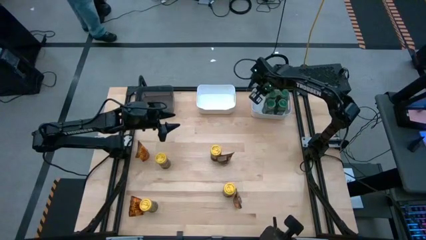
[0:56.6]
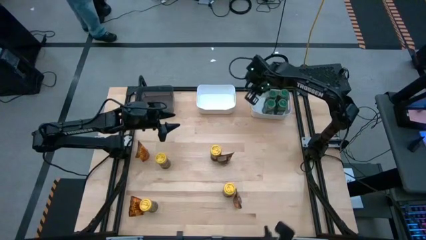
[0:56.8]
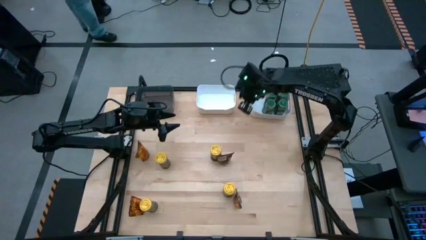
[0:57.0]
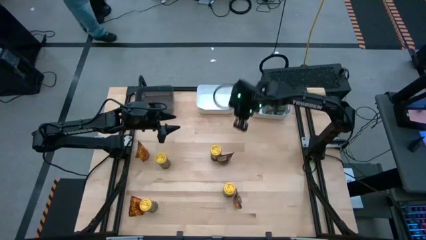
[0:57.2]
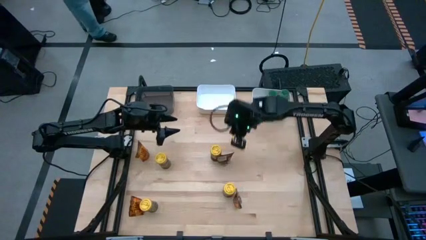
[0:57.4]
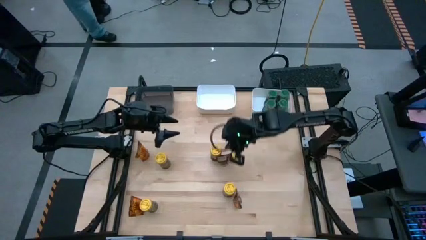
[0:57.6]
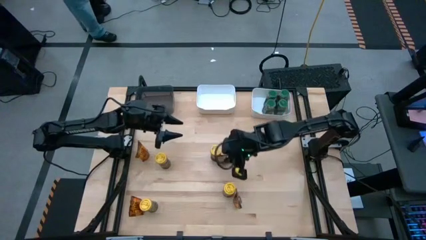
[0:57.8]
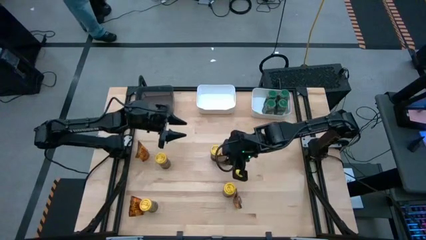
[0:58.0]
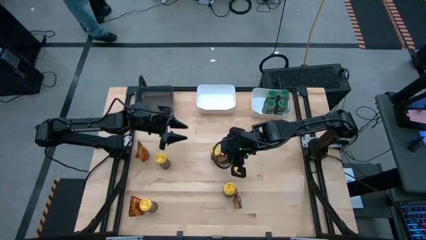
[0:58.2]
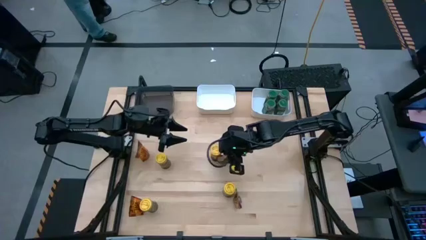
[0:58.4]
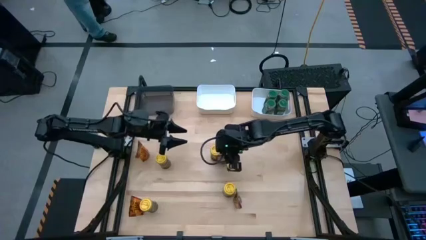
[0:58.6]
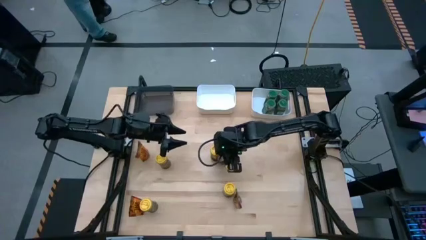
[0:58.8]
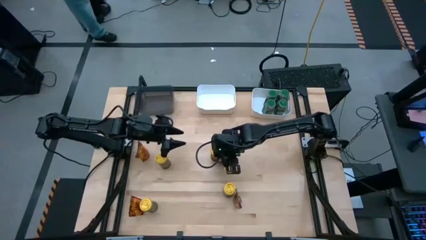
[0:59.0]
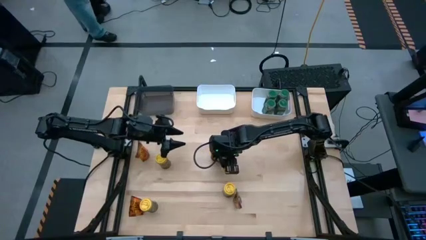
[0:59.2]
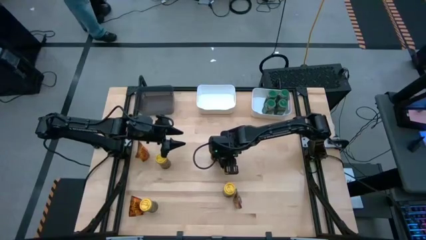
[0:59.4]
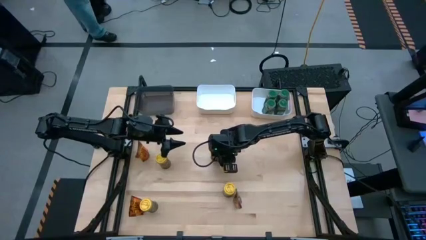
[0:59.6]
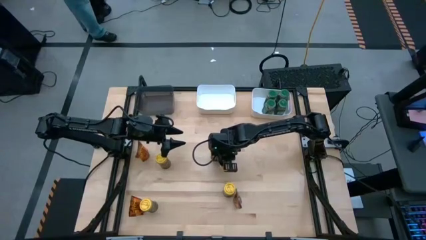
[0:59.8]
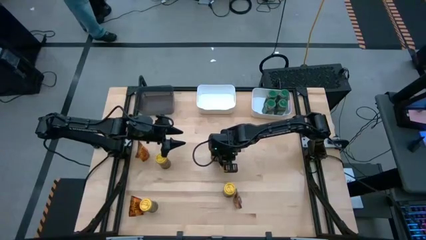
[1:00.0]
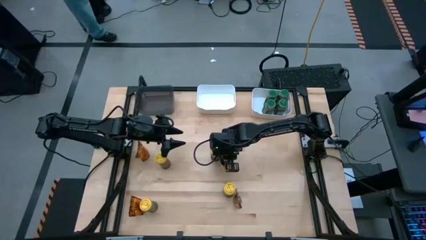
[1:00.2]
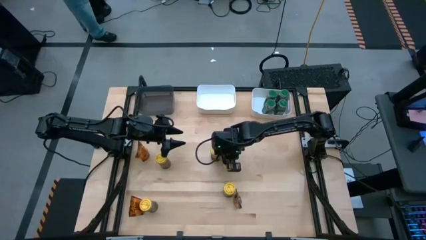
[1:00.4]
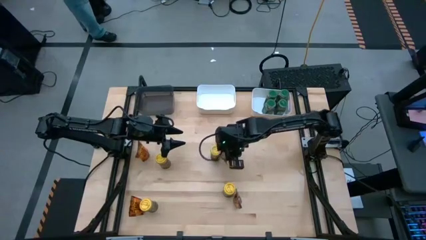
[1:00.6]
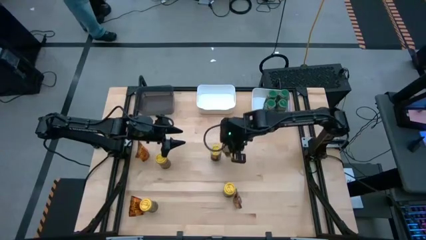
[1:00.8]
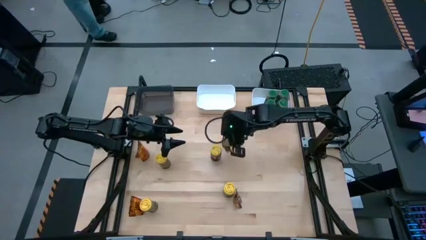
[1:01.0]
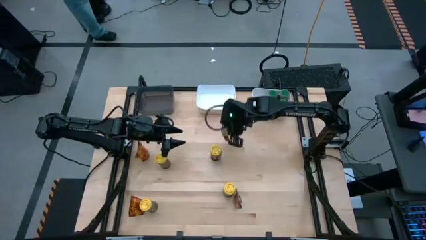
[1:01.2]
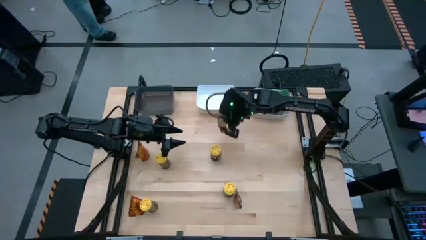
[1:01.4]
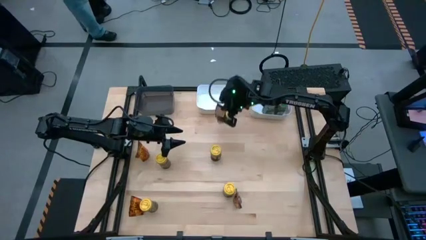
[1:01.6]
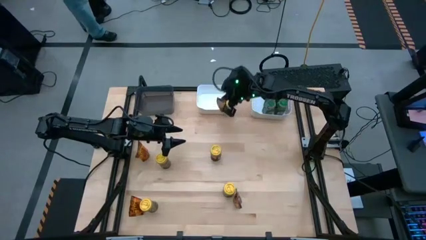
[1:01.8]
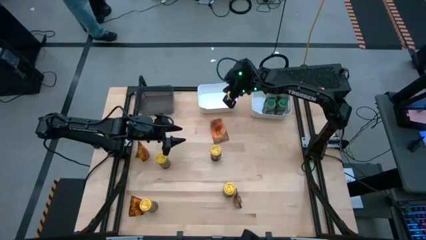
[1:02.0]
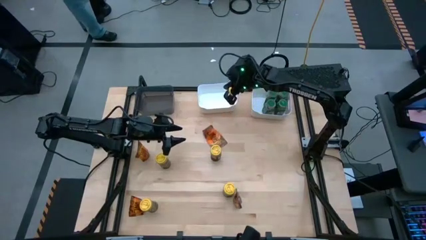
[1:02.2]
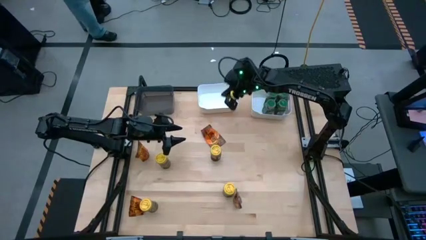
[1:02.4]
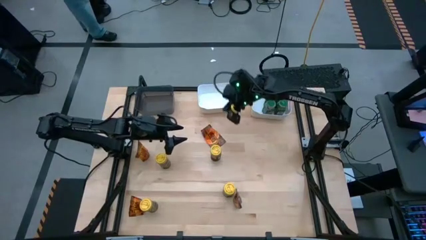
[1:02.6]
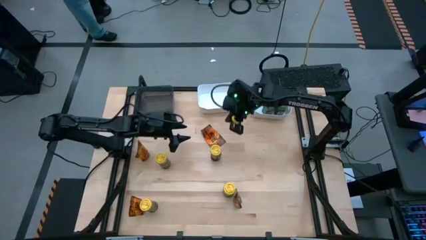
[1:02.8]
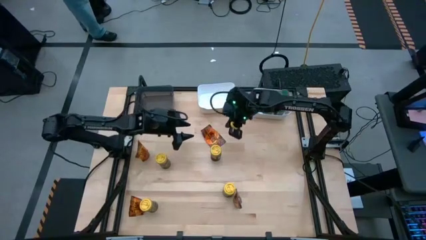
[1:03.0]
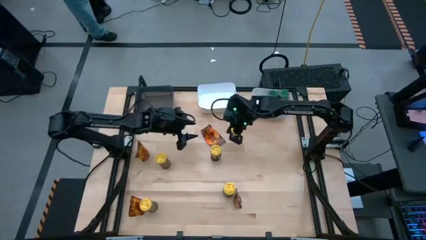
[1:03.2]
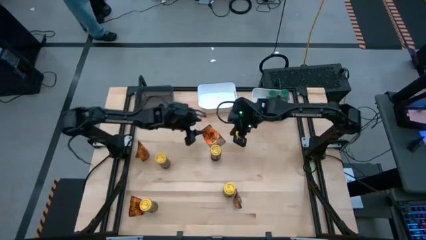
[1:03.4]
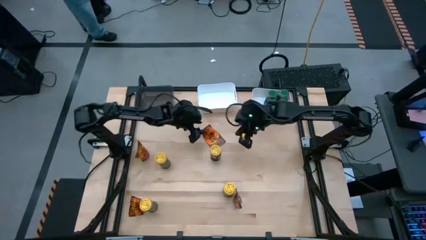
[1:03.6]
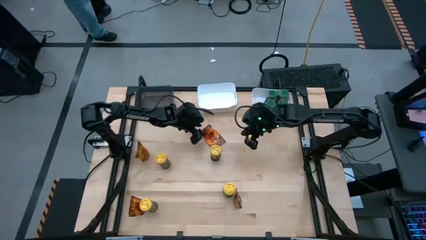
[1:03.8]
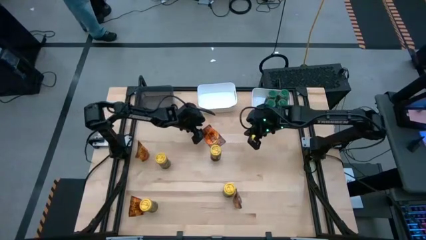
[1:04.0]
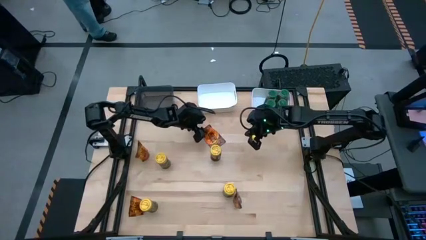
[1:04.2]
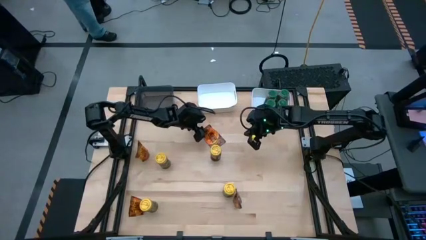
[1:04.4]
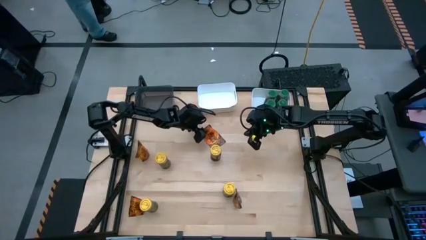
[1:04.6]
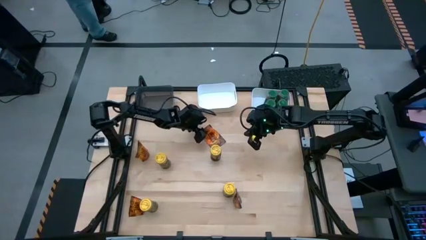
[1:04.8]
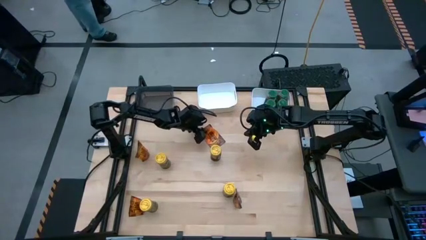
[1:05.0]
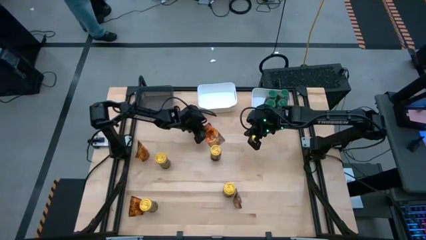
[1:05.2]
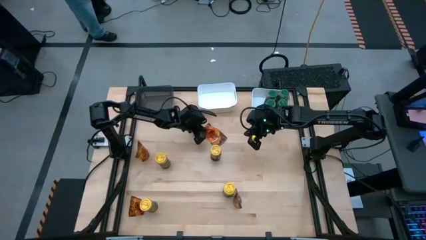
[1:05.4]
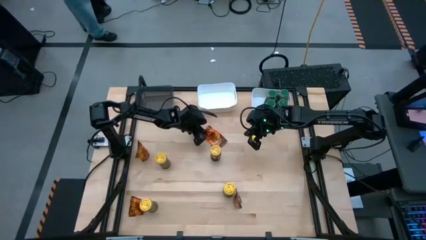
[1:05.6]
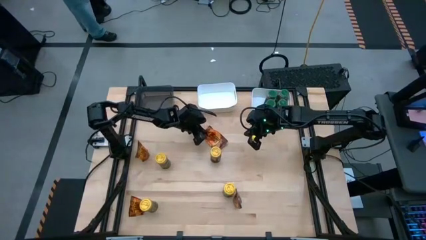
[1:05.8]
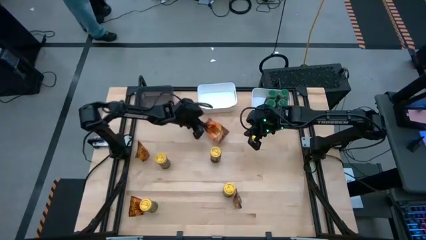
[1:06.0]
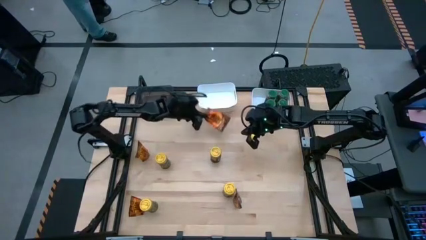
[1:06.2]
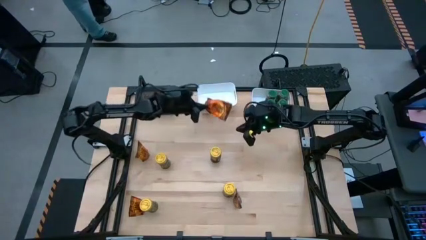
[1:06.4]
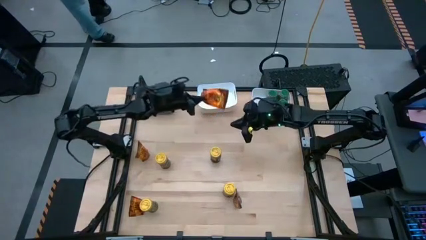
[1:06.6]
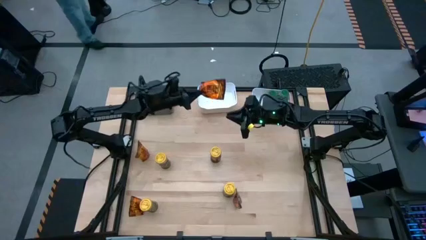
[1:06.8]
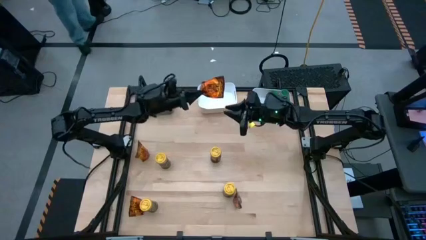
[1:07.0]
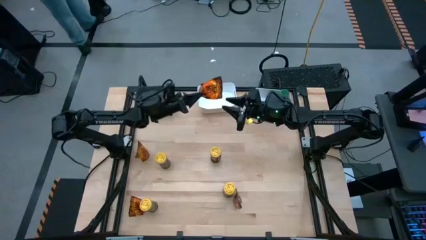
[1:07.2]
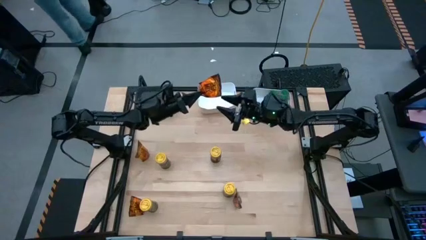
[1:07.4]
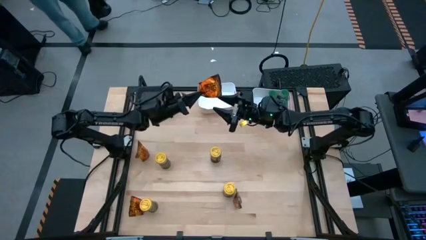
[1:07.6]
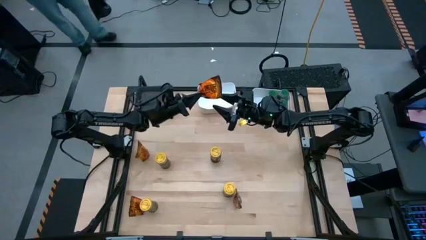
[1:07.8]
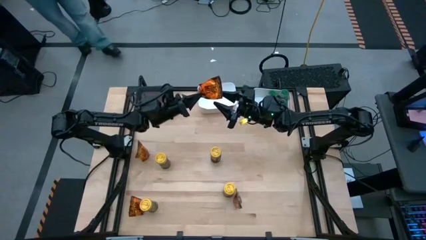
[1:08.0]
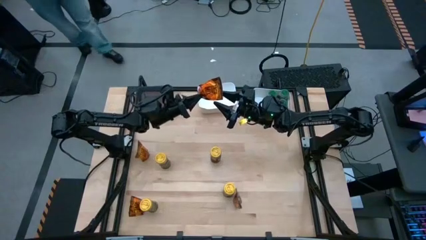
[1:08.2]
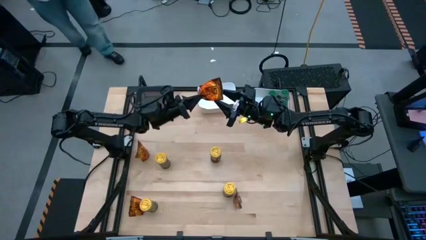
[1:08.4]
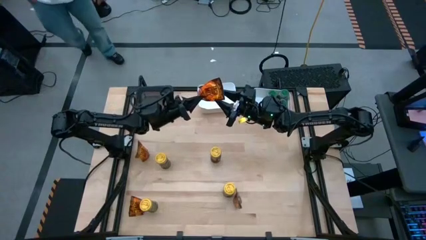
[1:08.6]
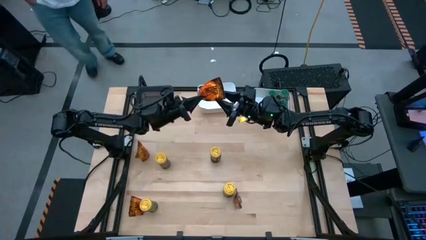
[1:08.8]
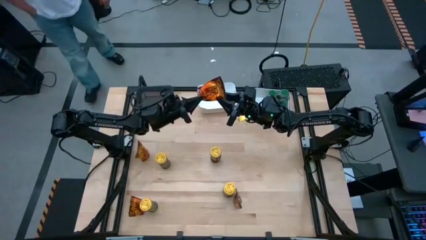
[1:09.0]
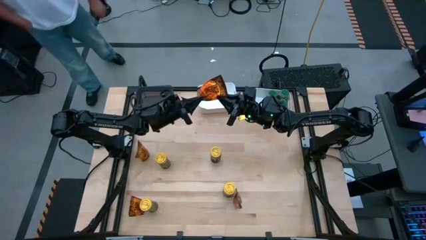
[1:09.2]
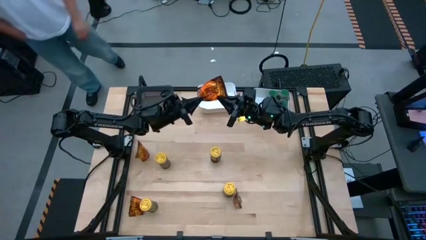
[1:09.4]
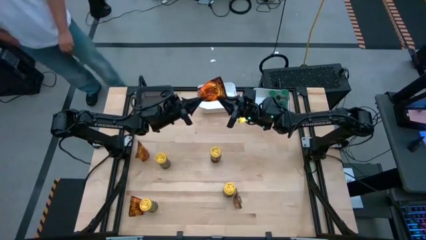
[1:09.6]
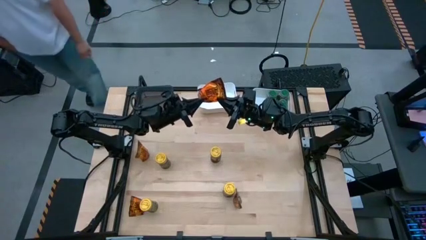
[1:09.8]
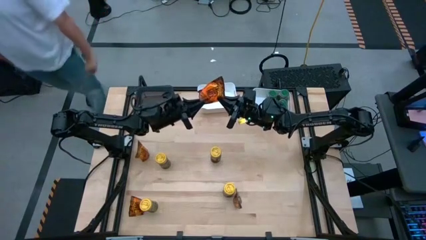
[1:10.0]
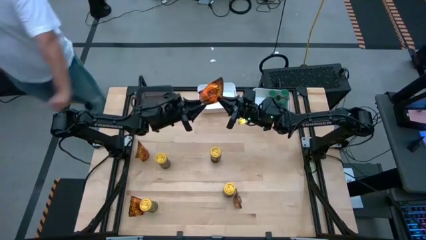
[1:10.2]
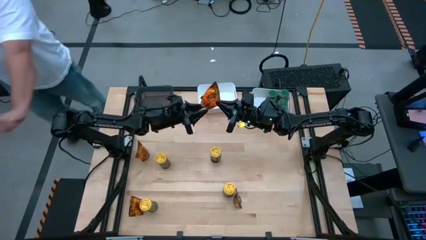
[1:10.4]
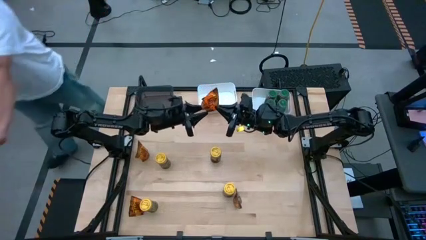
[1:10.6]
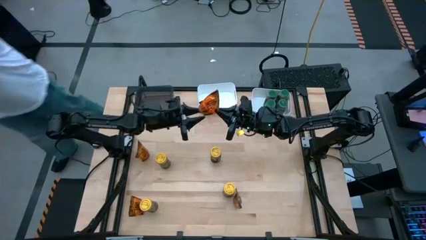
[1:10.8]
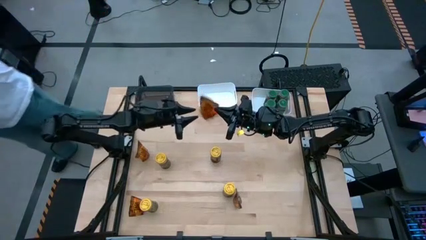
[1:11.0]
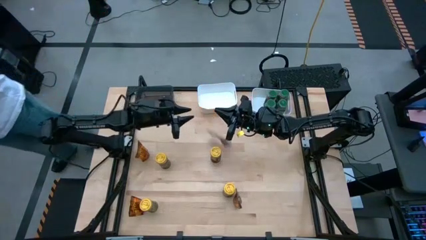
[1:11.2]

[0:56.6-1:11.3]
Task: Sort spices by type
Put the top right orange seasoning bag into the left white bin

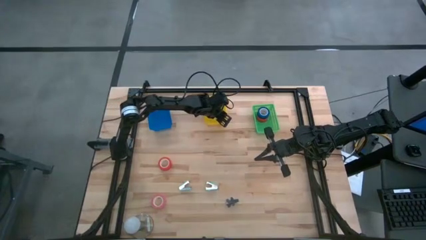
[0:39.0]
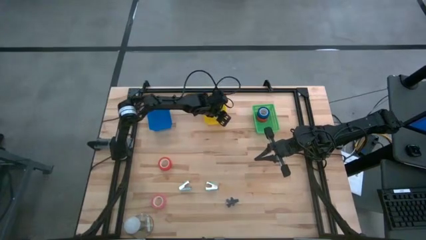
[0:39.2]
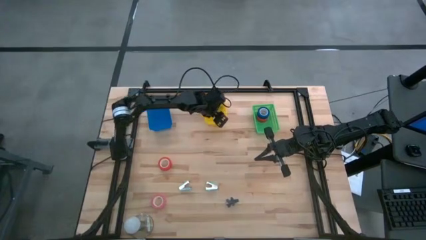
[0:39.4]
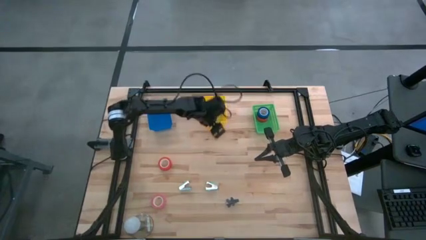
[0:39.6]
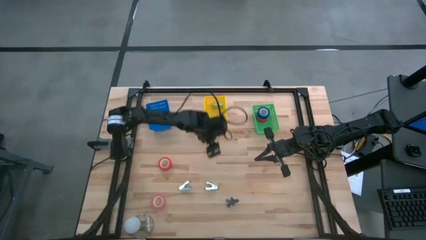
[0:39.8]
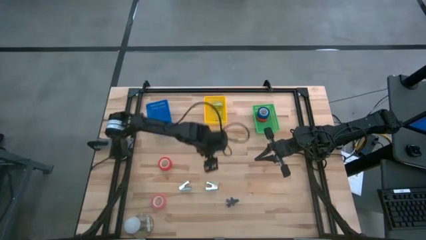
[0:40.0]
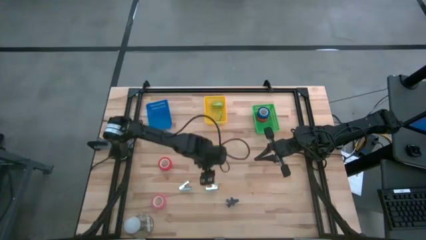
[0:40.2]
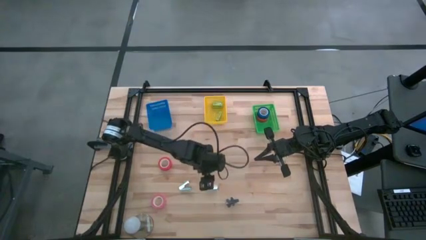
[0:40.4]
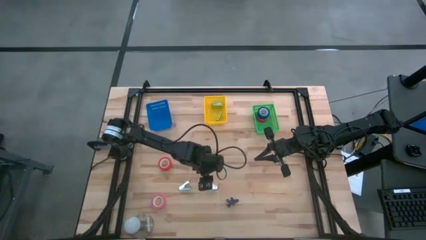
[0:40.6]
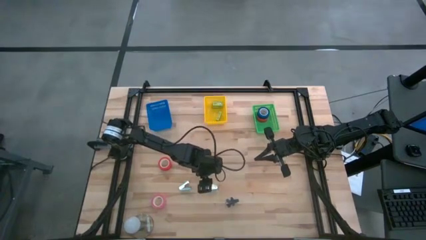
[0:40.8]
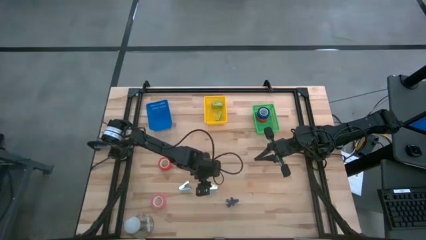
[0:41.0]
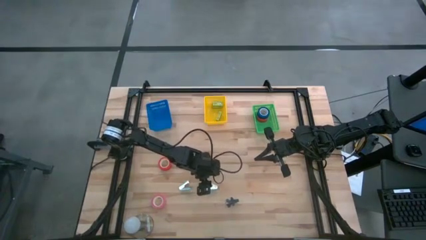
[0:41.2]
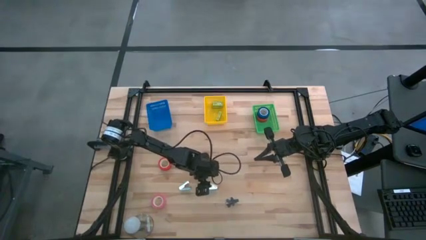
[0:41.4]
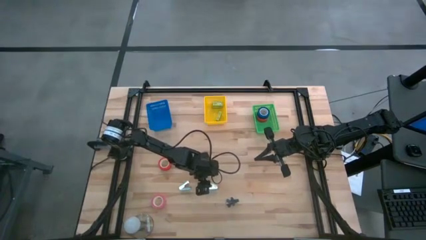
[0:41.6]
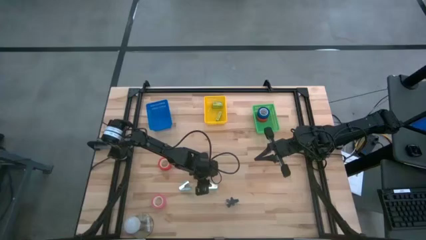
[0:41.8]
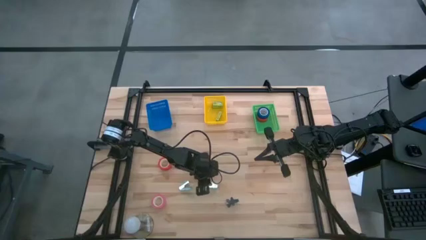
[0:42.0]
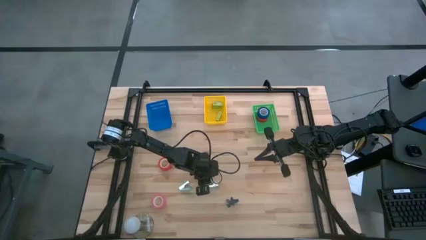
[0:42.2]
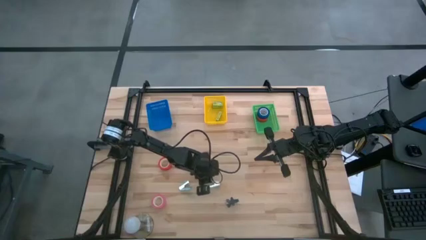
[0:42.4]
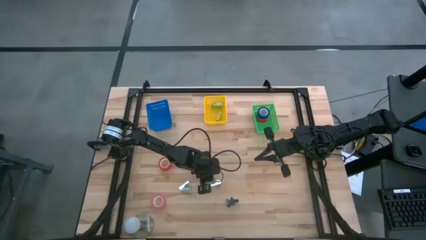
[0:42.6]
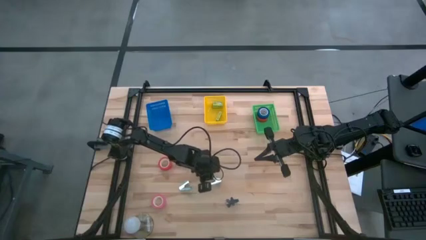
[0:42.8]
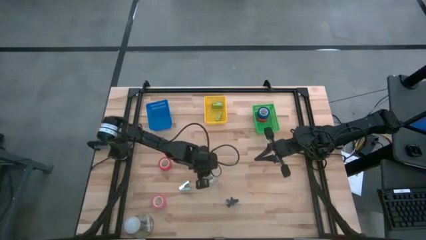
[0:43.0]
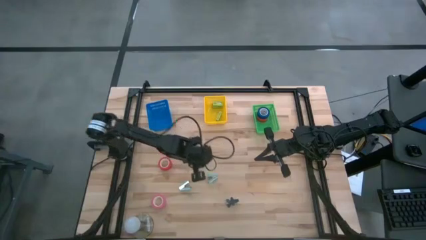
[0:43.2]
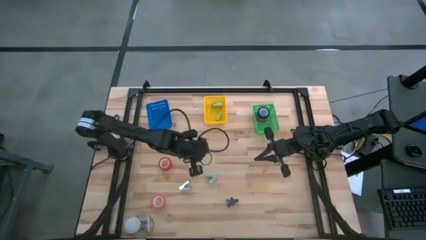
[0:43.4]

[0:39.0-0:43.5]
Task: Pick and place Stapler, Stapler remover, tape
Put the right light blue staple remover into the blue bin
